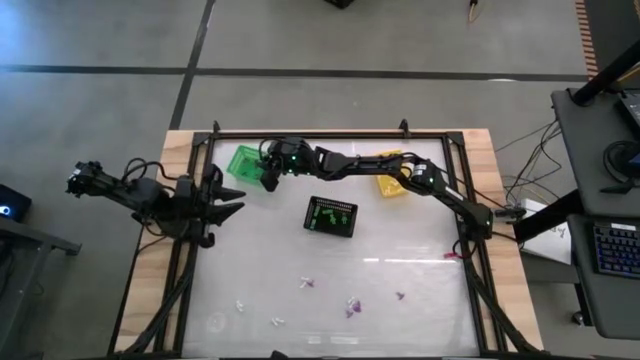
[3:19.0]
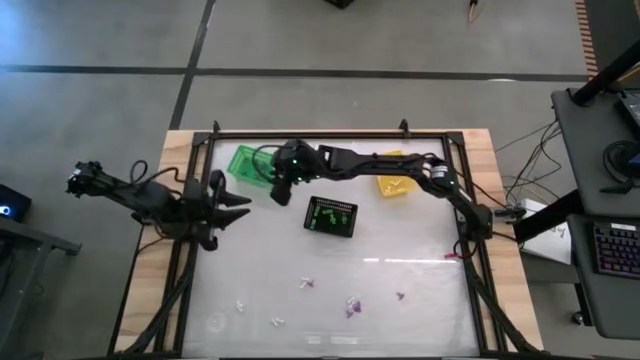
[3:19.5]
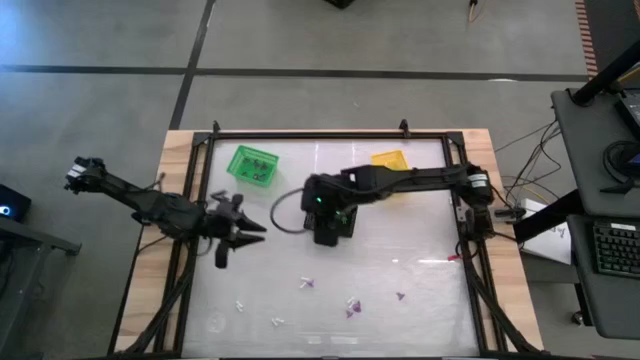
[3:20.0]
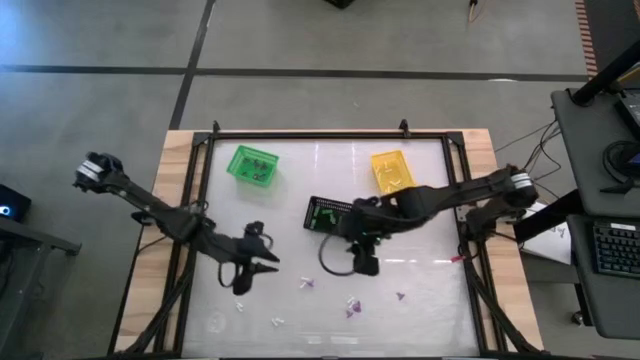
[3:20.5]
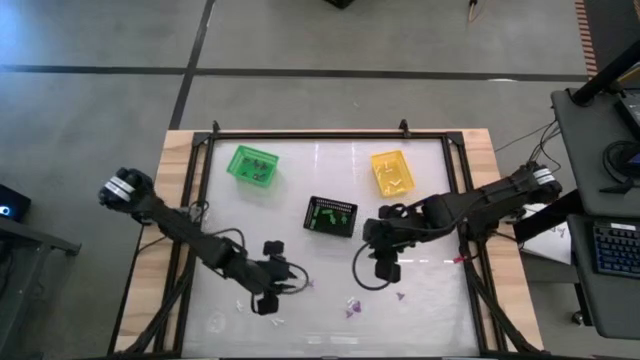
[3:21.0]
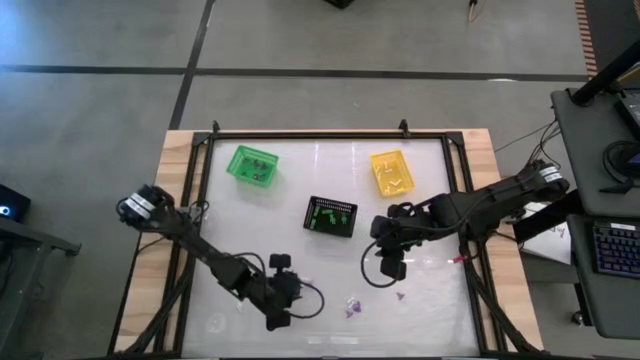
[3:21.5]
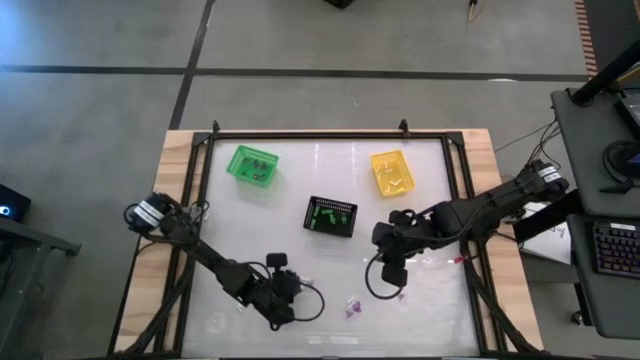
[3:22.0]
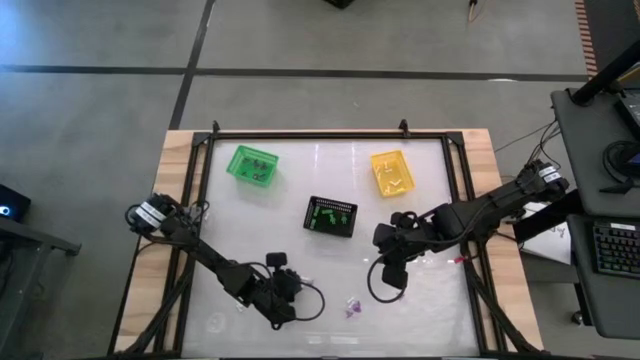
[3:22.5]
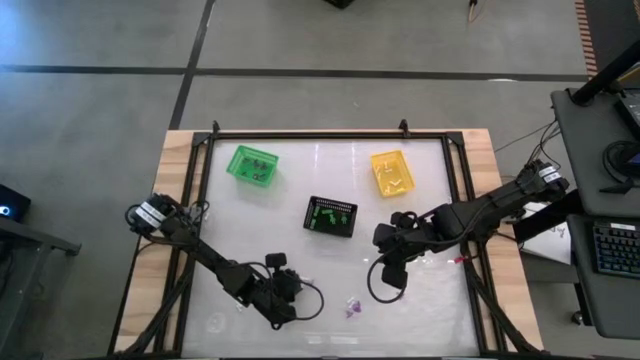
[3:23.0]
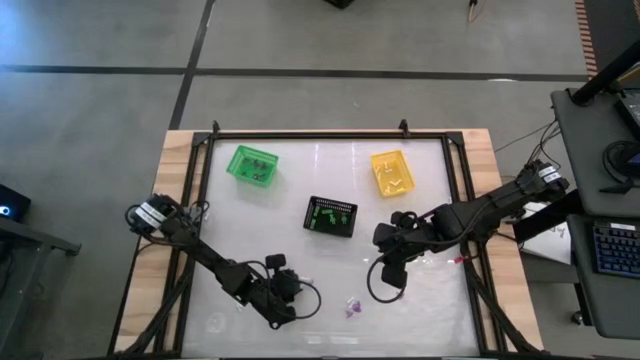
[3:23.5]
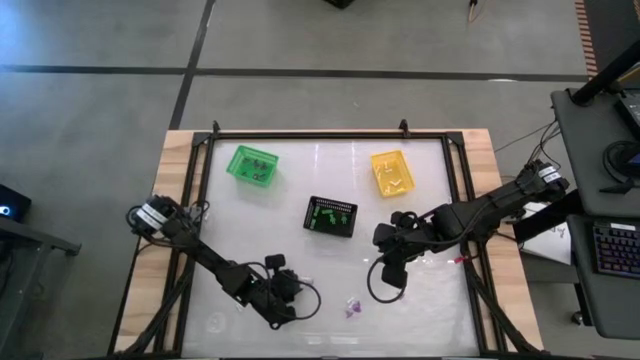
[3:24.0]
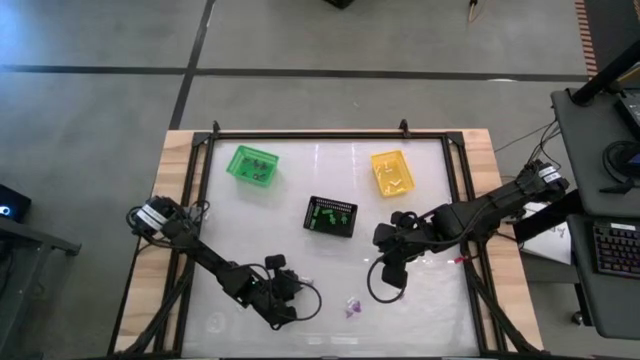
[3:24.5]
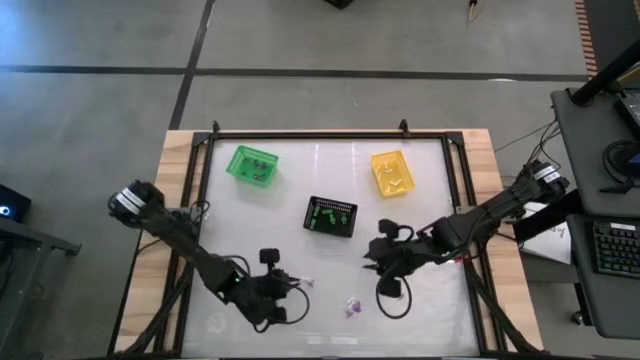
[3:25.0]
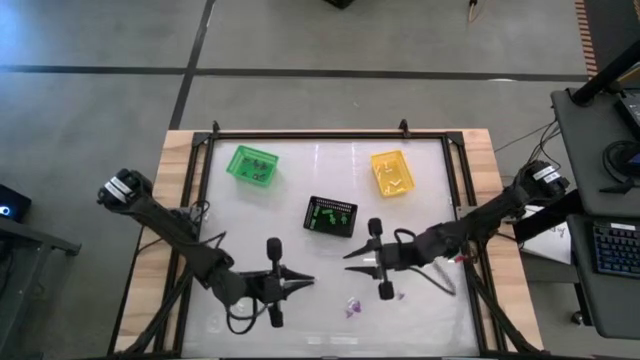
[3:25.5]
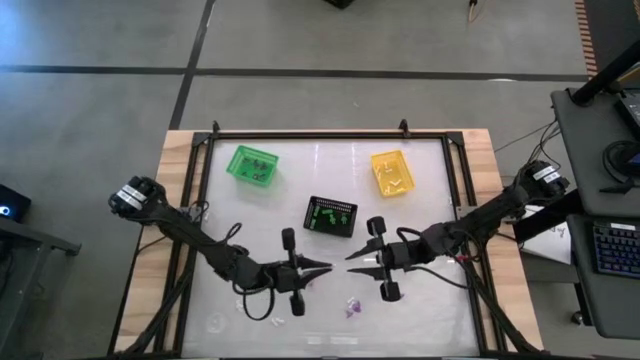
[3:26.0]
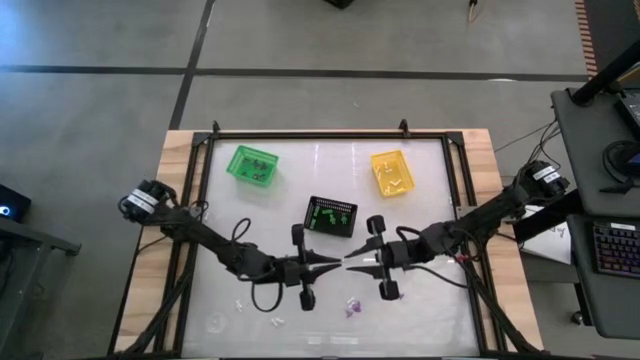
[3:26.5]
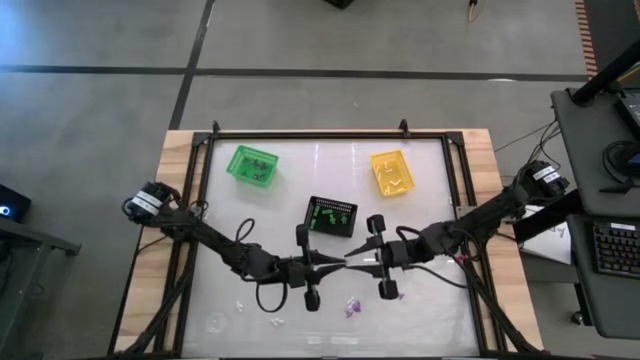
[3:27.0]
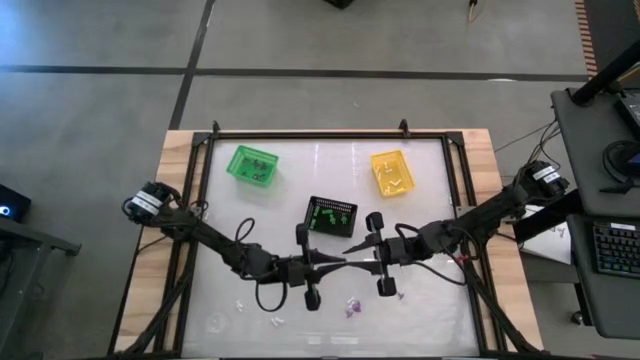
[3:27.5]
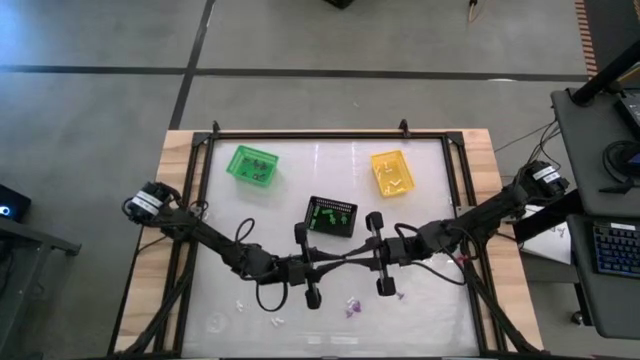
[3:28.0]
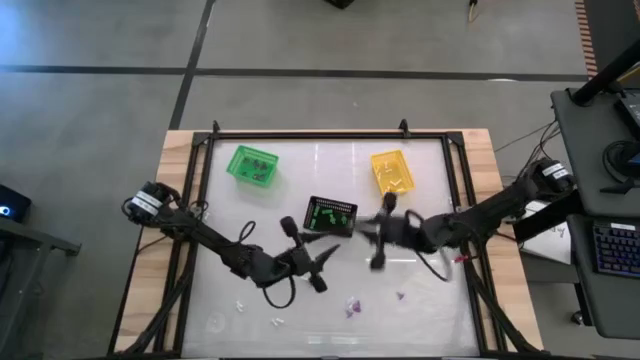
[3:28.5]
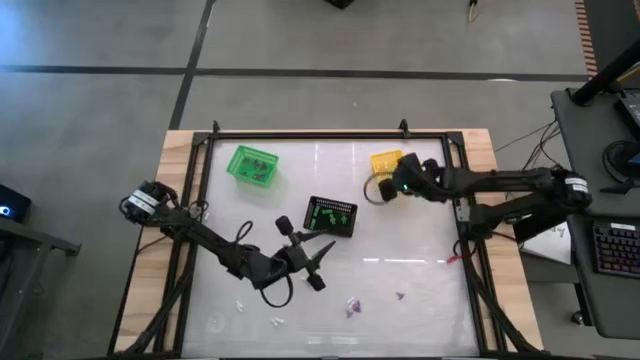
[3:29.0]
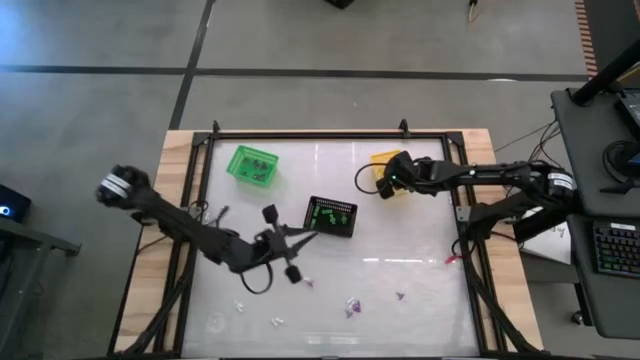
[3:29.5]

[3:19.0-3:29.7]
Task: Sort Halloween decoration
Put the white bone into the yellow bin

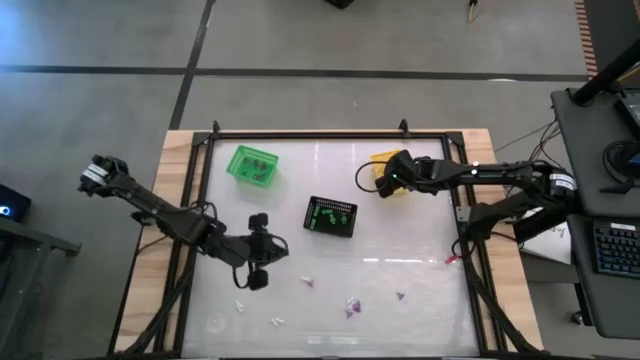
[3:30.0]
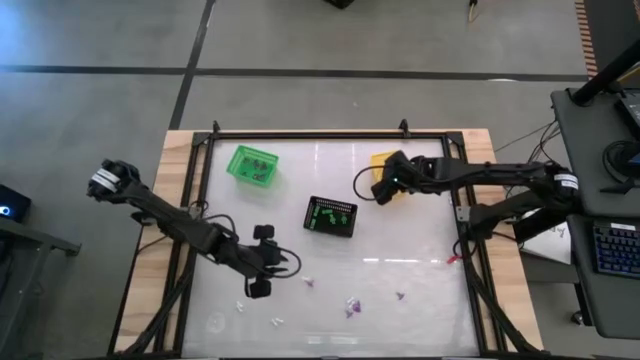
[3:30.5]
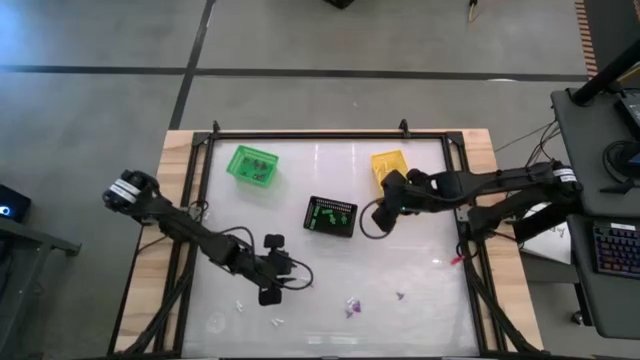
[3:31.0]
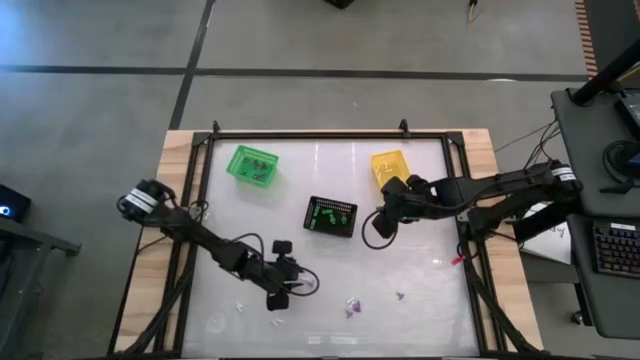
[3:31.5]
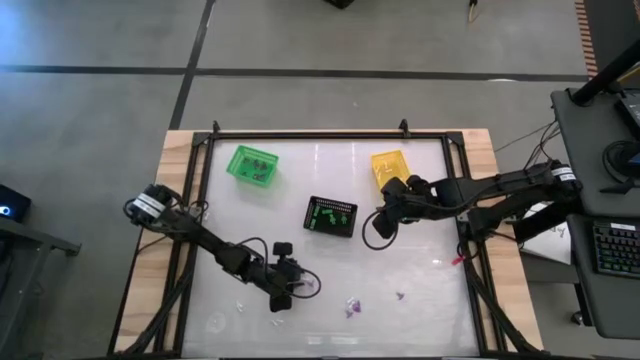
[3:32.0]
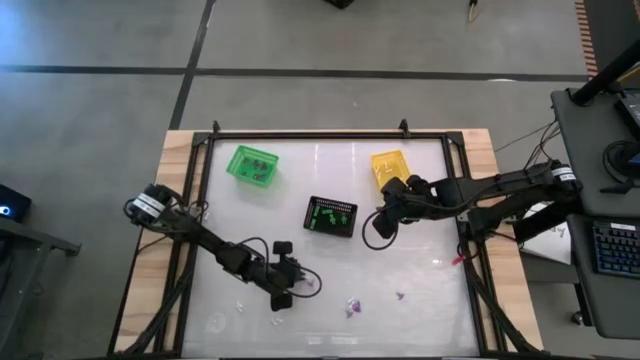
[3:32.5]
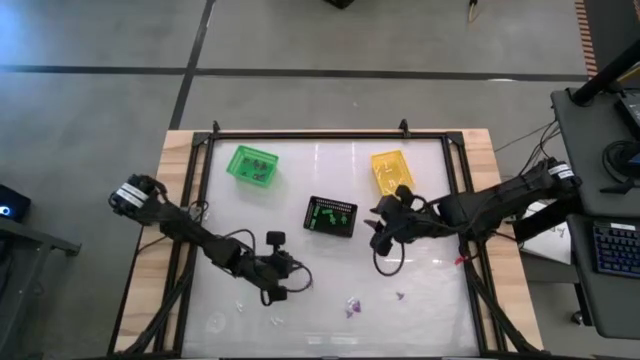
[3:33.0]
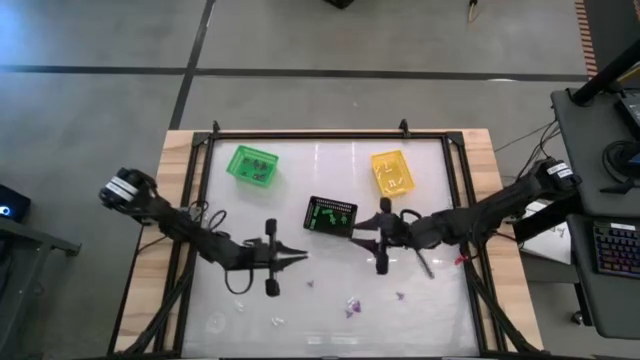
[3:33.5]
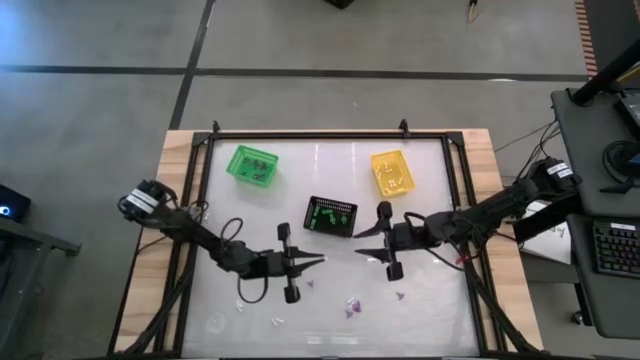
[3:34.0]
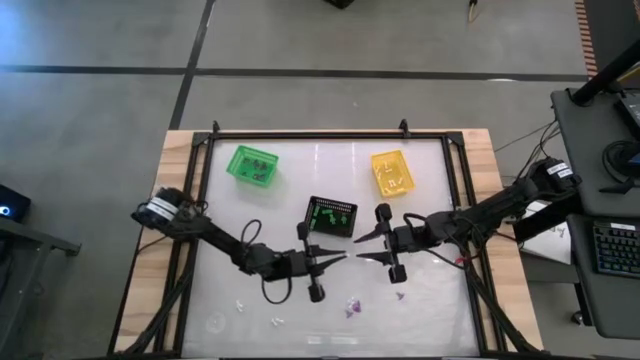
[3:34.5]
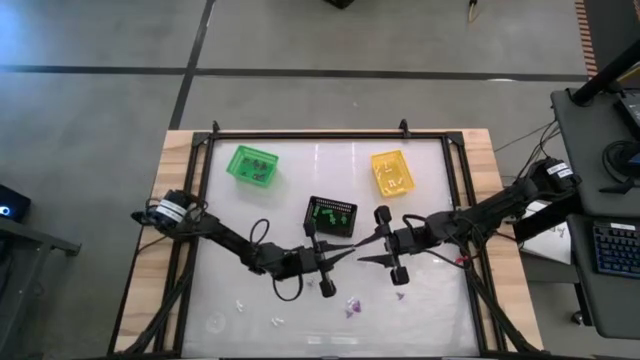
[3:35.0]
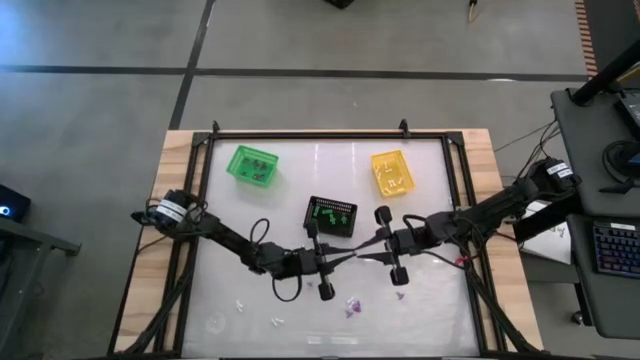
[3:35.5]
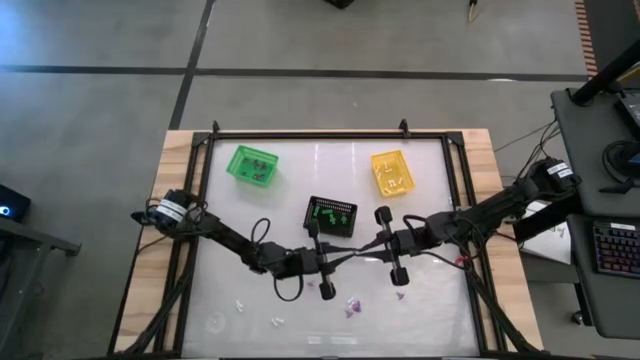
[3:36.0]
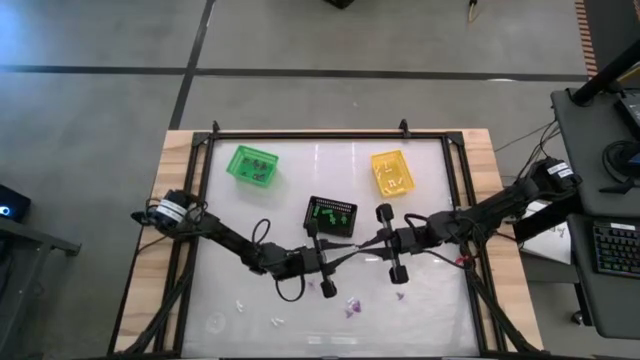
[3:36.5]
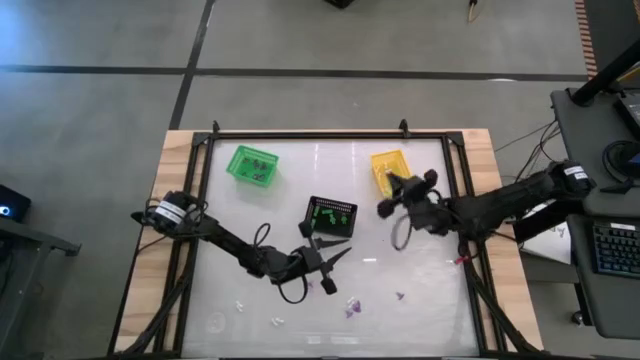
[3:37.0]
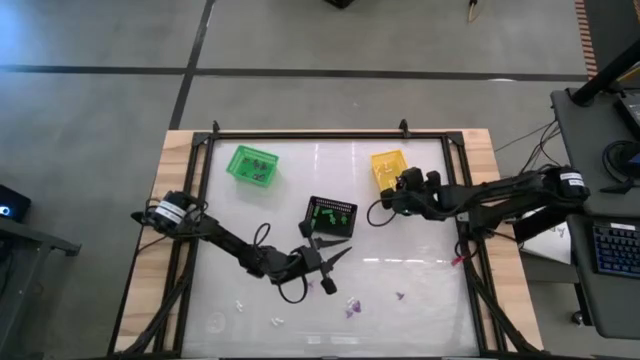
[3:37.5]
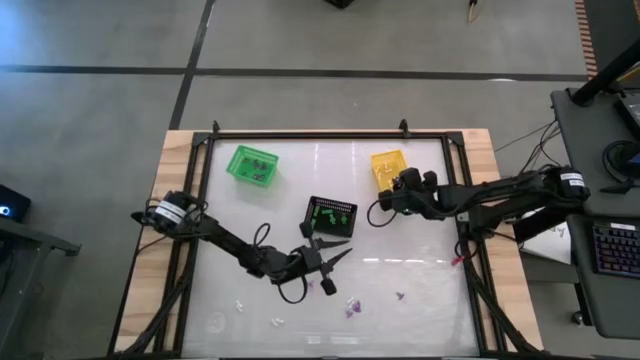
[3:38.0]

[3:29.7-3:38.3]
Put the white bone toy into the yellow bin

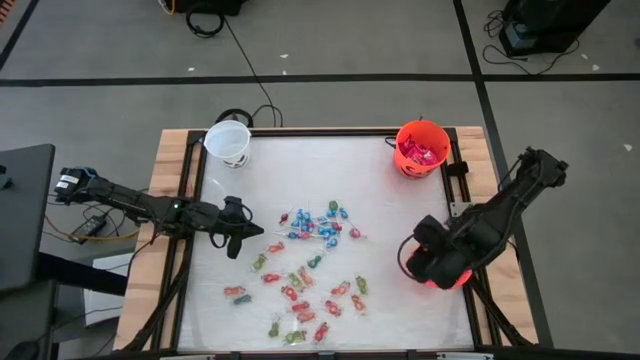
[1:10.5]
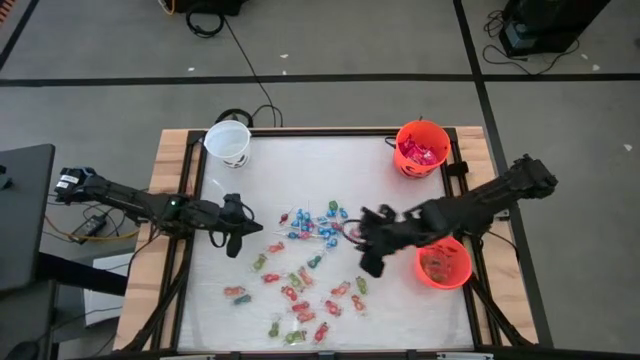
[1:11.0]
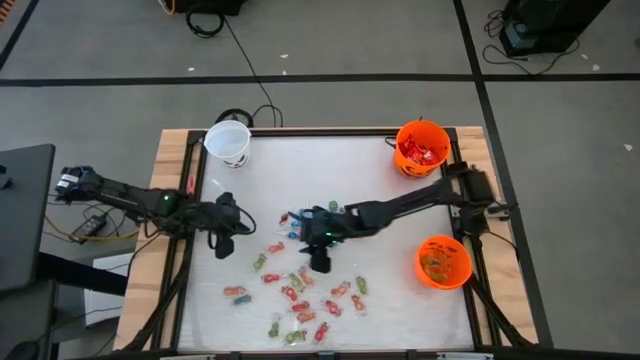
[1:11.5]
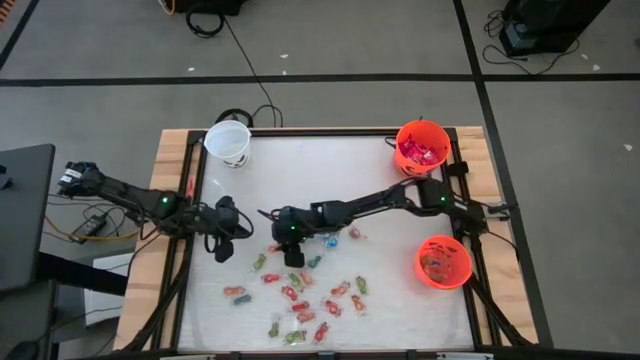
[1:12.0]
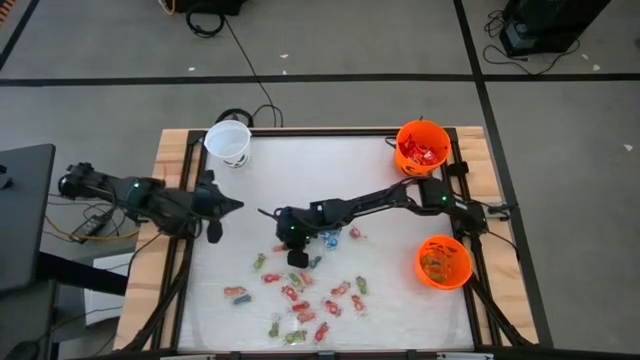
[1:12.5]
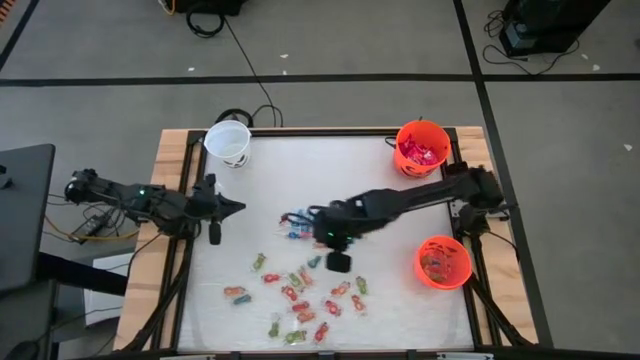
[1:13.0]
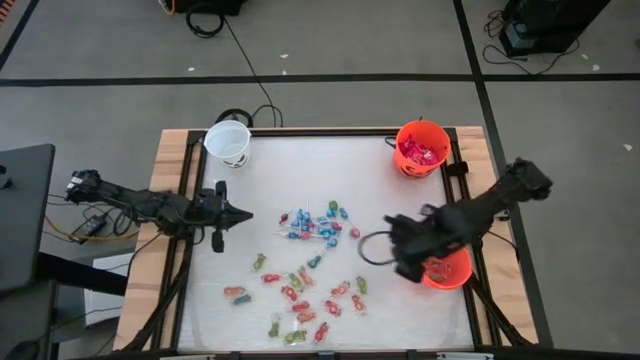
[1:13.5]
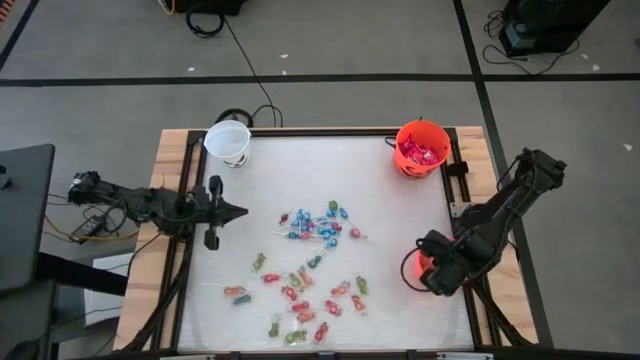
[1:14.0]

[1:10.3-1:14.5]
Task: Sort candy by brand, put in halloween buckets
Put the orange gummy into the bottom orange bucket
